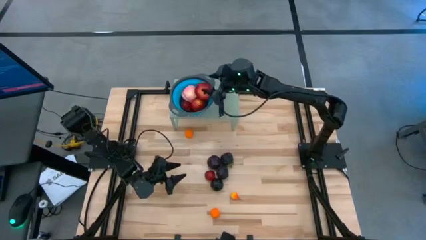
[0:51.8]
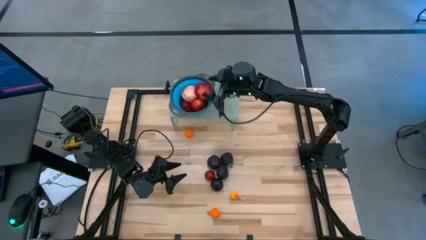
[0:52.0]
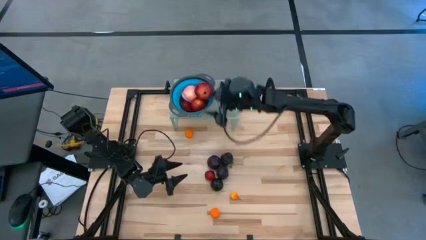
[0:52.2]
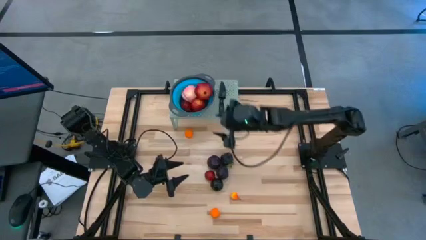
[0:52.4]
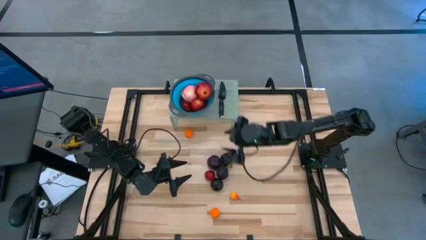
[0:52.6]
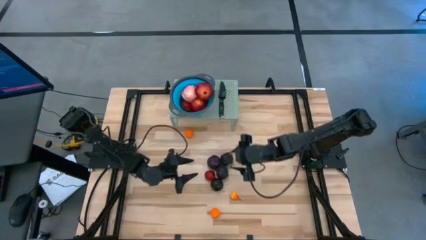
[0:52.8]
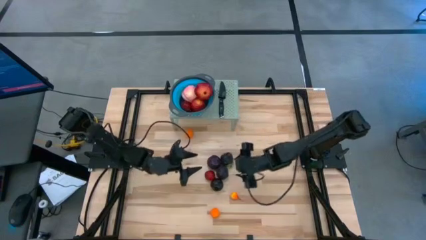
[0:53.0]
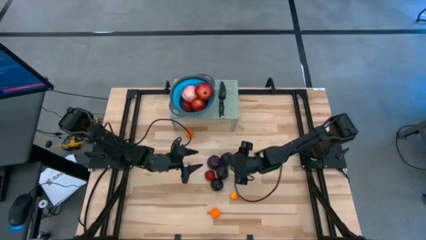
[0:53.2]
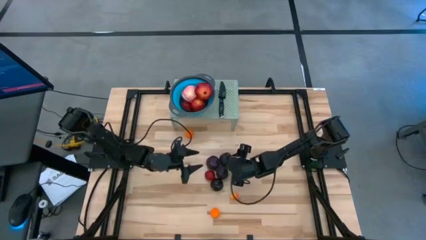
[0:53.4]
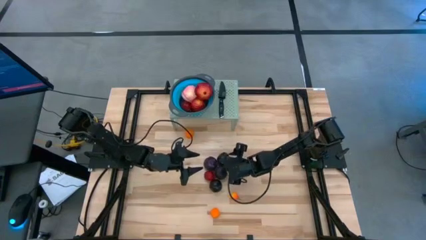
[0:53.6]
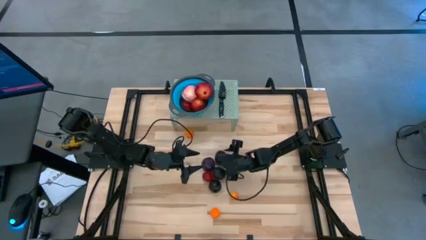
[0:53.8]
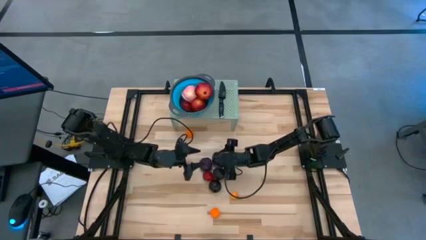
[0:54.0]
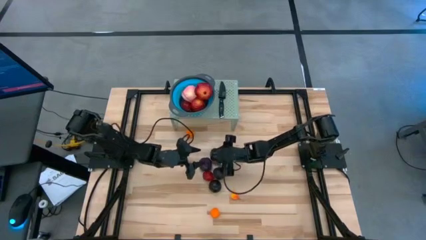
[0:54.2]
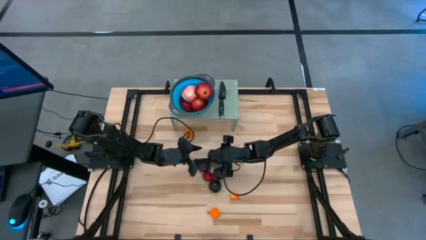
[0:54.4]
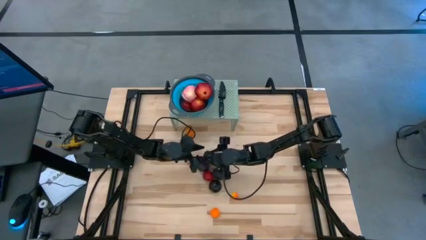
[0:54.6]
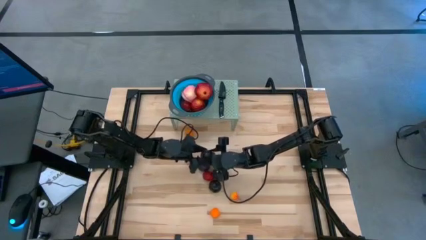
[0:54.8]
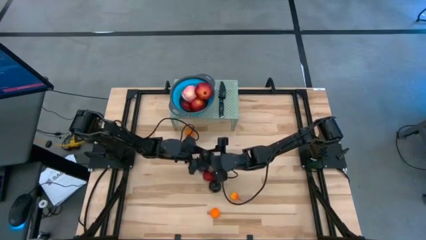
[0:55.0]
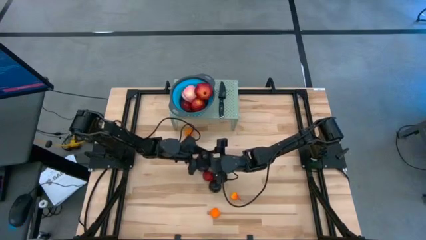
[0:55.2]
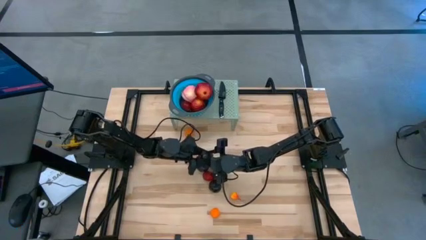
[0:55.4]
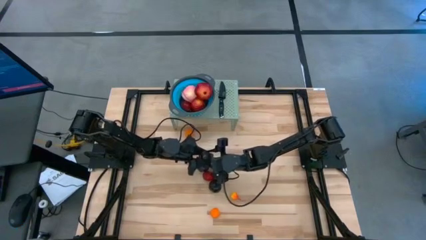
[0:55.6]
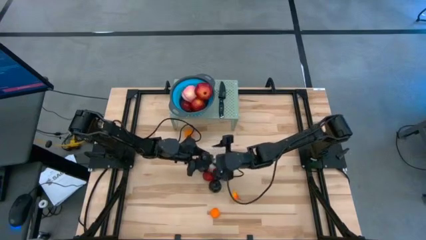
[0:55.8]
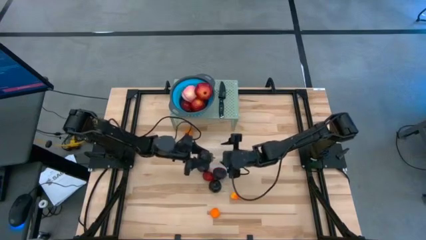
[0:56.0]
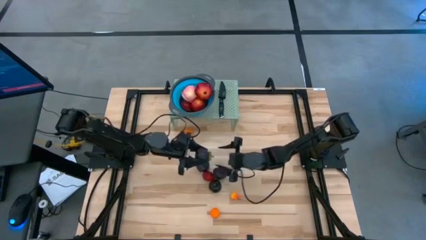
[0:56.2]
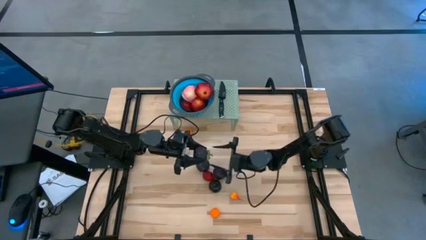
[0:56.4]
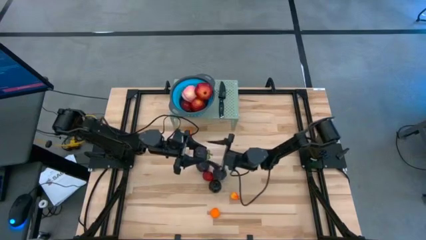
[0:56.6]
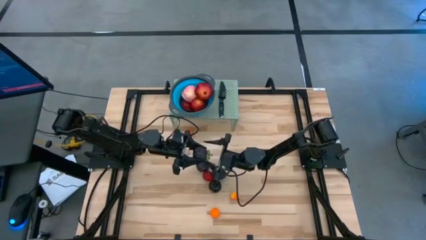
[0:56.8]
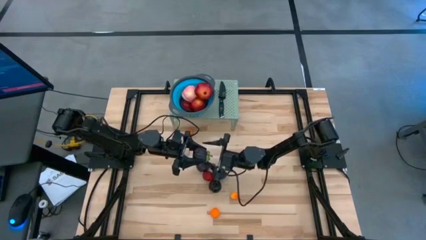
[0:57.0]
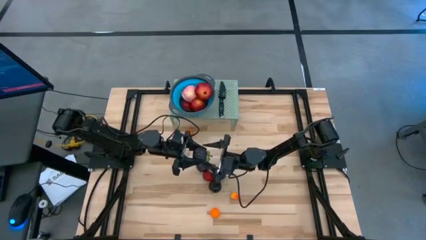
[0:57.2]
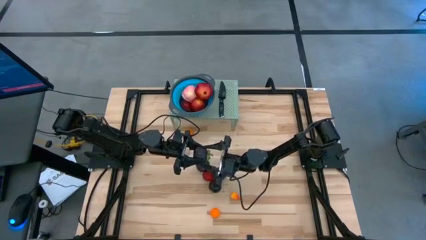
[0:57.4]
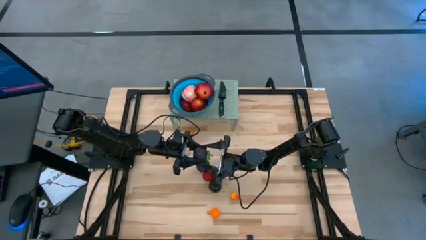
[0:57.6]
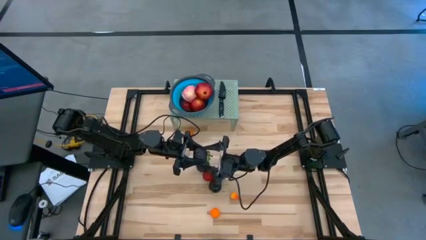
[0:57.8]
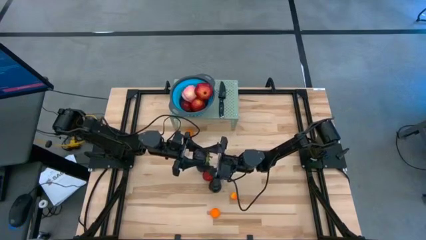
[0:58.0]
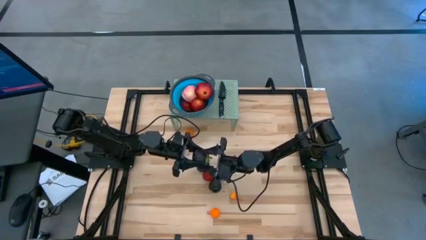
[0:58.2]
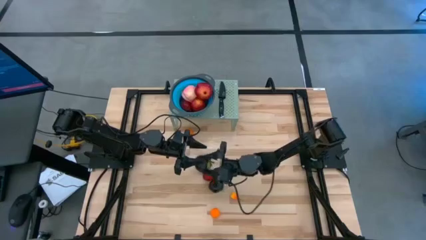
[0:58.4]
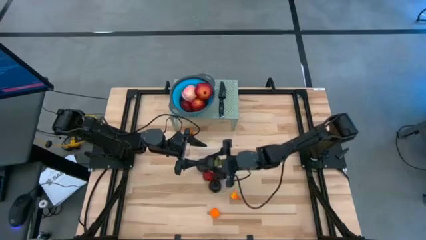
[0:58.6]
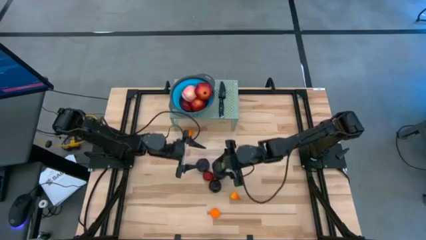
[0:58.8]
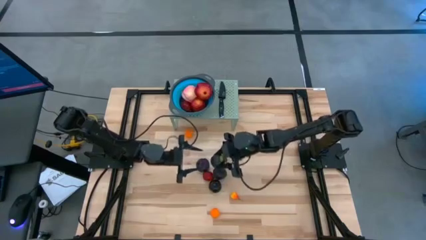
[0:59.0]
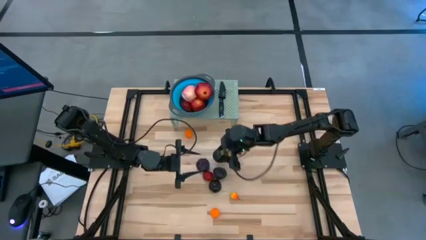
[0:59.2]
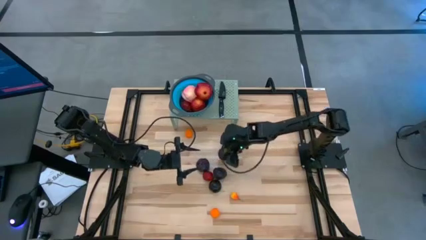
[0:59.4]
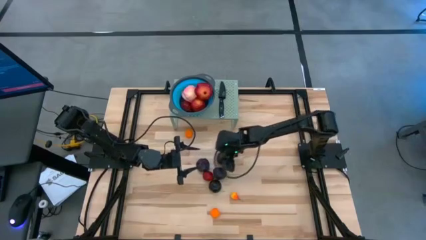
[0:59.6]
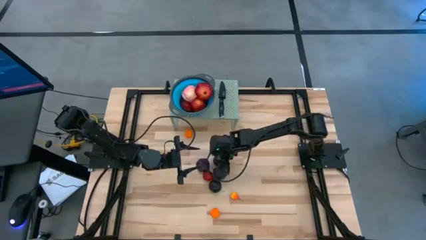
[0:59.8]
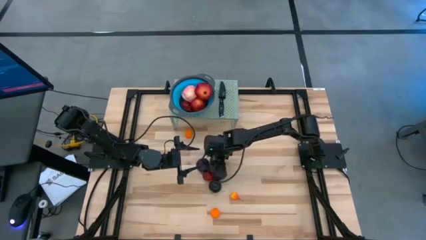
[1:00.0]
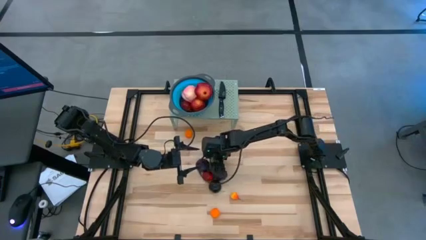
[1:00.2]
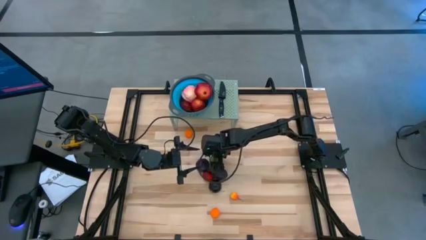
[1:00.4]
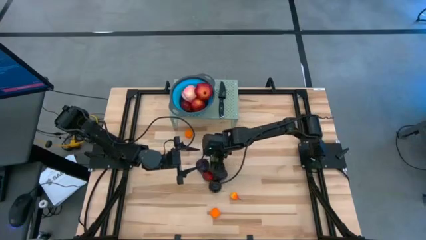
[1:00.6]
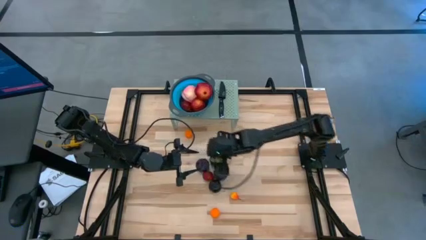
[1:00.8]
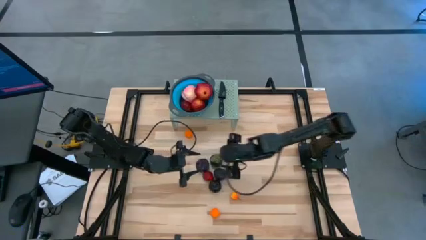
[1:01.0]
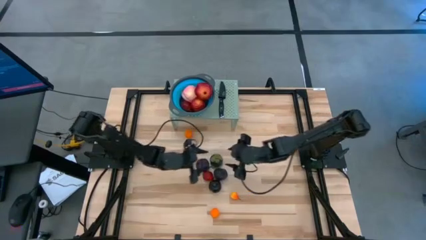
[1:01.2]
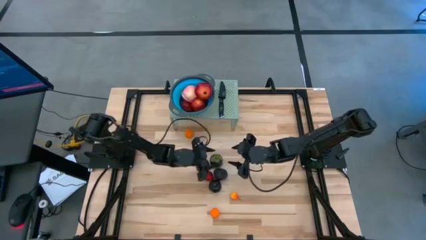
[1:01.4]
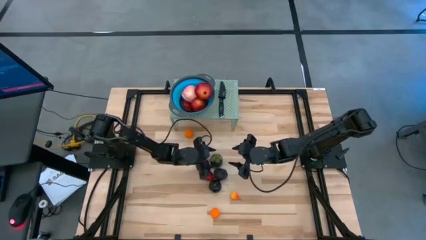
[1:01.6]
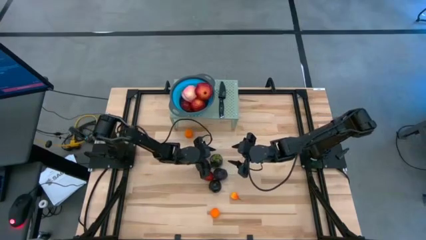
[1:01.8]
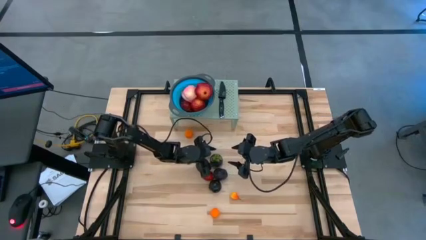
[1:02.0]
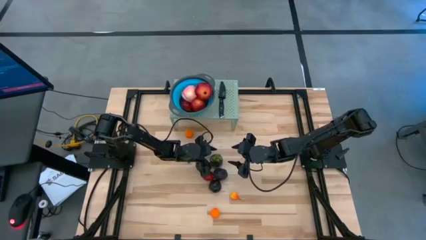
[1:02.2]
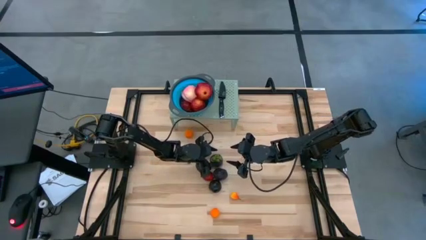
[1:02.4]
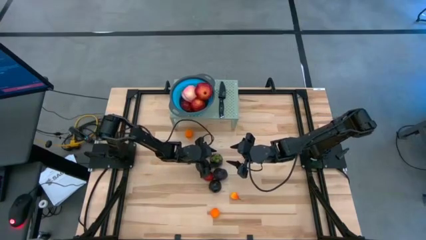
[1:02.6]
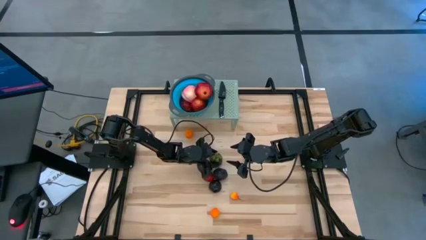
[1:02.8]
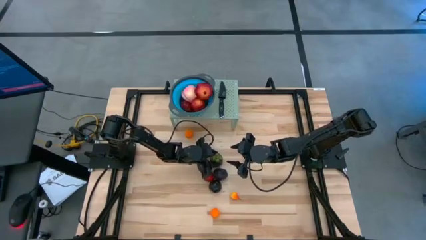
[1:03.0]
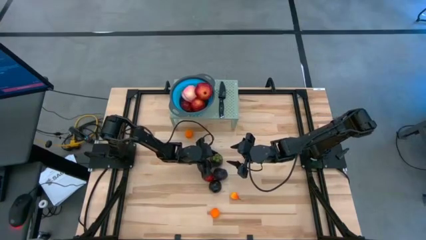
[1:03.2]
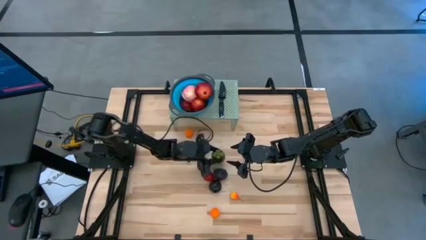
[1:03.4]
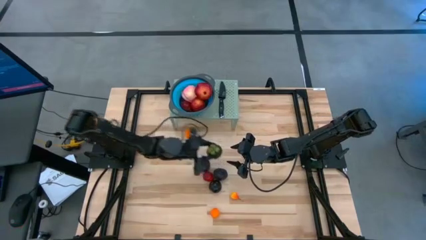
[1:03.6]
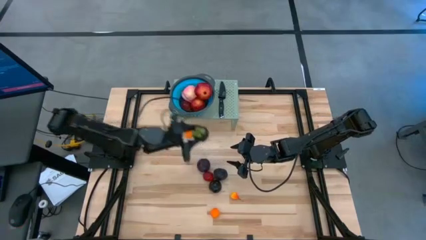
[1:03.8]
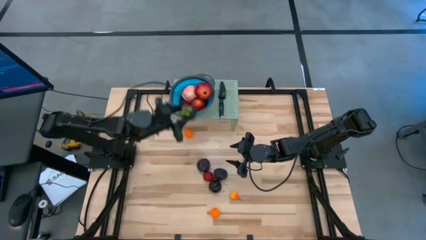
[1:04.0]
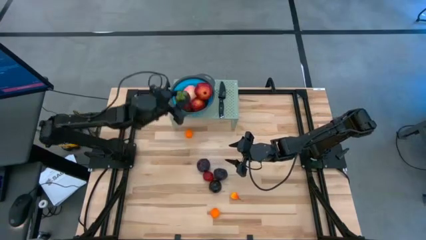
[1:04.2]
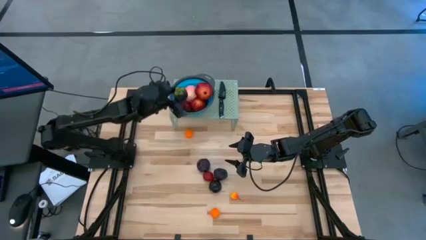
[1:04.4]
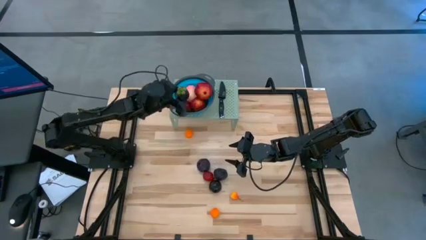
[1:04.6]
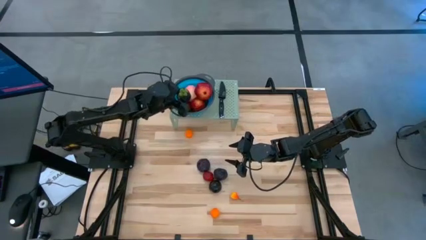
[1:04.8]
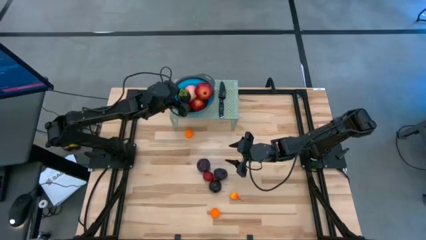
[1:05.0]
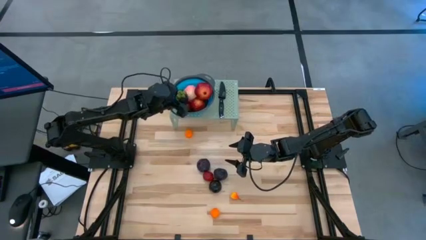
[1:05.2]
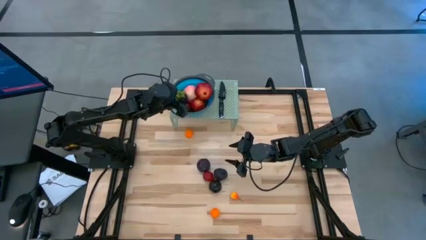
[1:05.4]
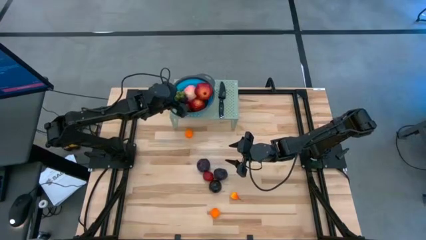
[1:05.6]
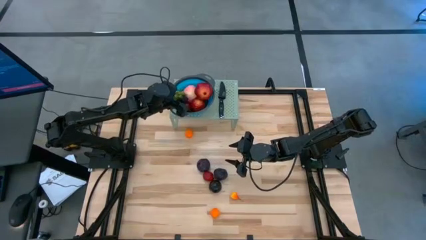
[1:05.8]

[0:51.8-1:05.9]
Task: Pick & Place Fruit
Put the purple mangosteen into the blue strainer bowl

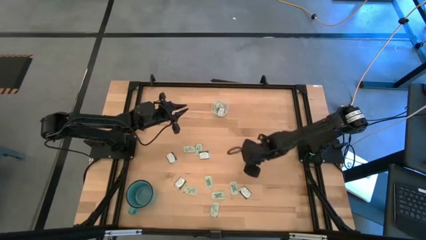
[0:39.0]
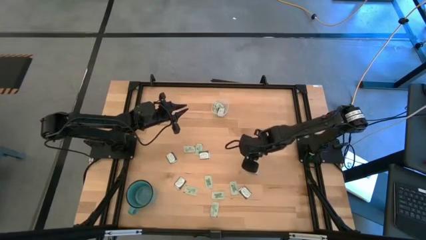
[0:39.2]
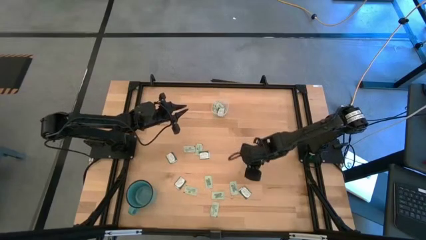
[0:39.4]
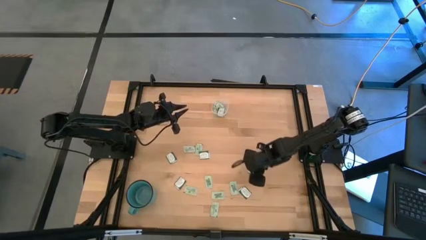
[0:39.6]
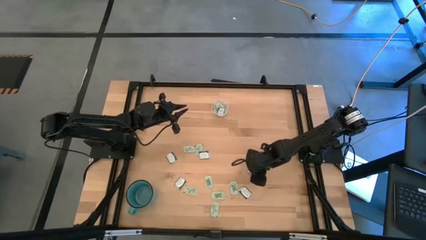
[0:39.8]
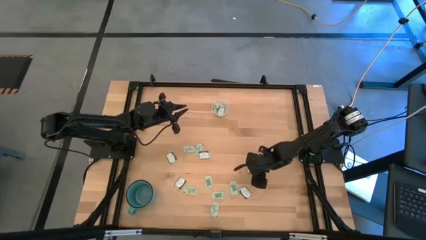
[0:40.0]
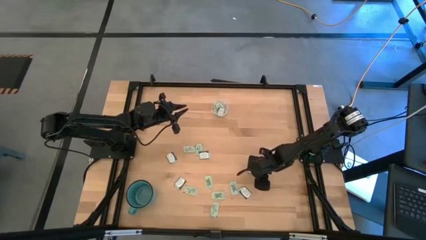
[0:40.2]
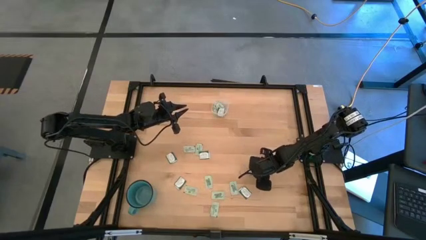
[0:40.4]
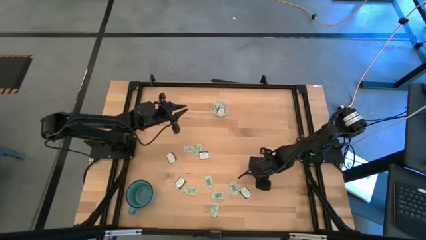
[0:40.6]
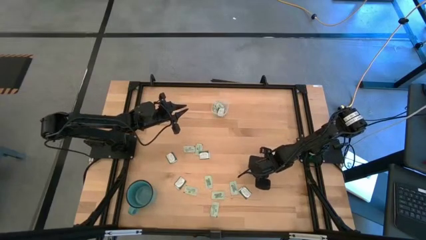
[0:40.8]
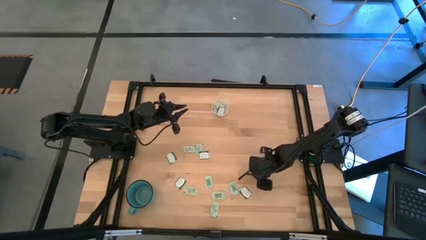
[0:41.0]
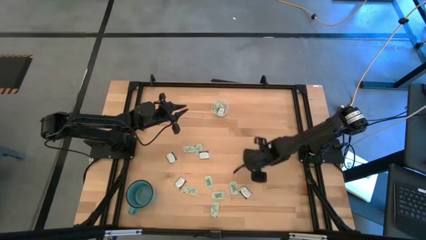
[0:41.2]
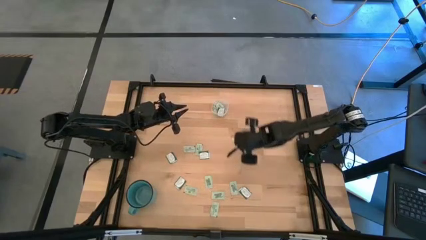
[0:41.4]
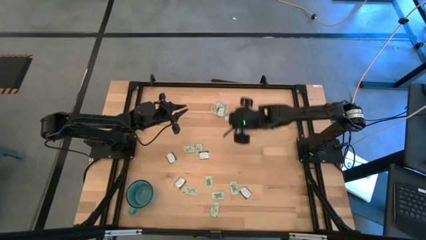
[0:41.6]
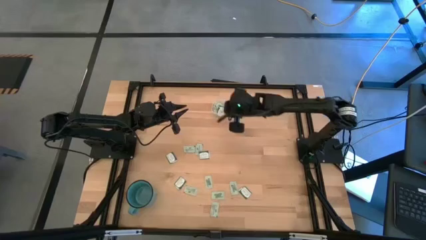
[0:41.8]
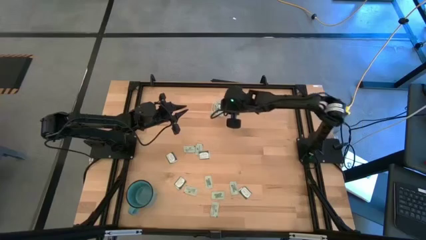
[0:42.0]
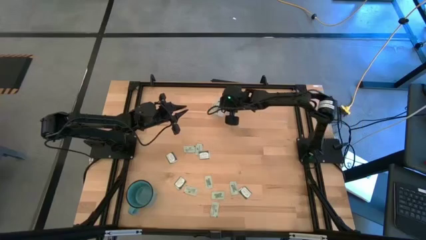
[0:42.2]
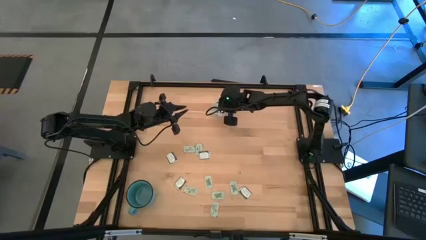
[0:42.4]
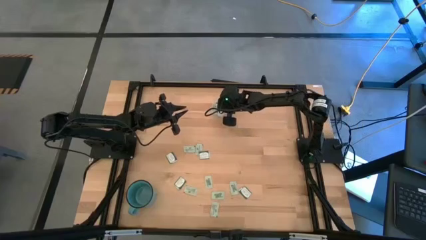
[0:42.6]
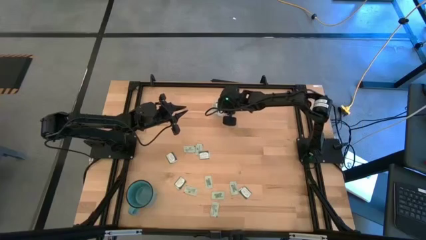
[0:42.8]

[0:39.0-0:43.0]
Task: Pick and place items into bin
Put the green stevia packet into the transparent bin
